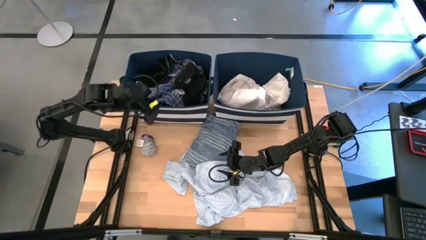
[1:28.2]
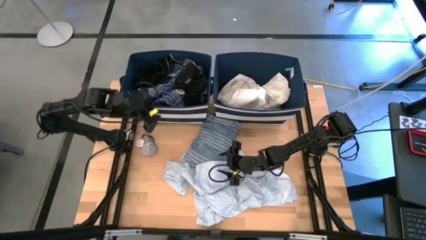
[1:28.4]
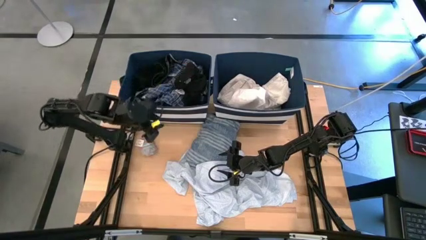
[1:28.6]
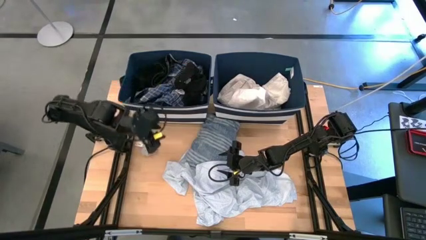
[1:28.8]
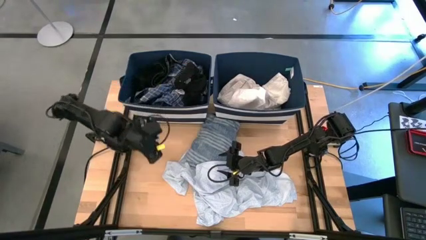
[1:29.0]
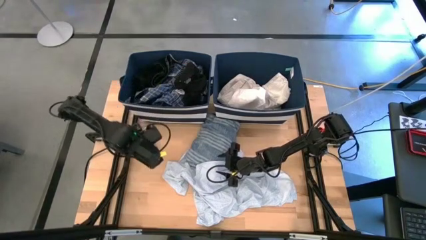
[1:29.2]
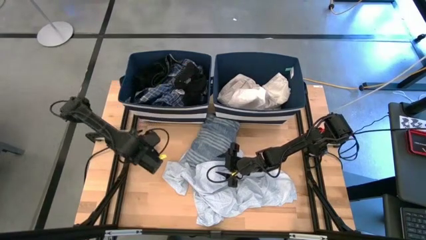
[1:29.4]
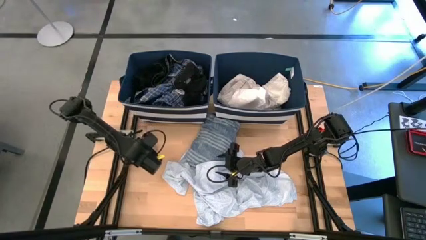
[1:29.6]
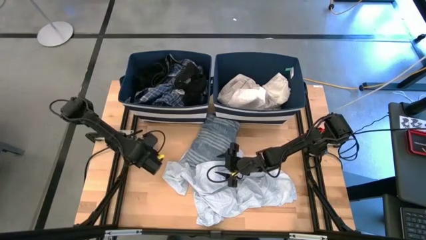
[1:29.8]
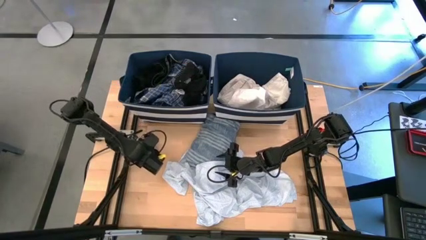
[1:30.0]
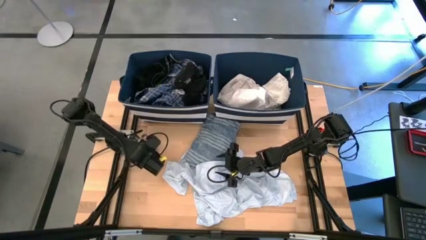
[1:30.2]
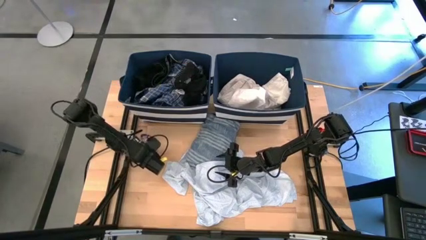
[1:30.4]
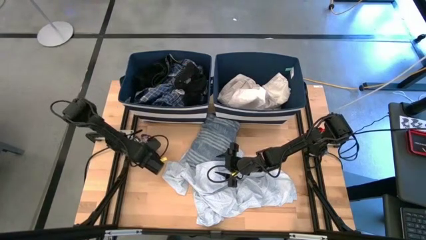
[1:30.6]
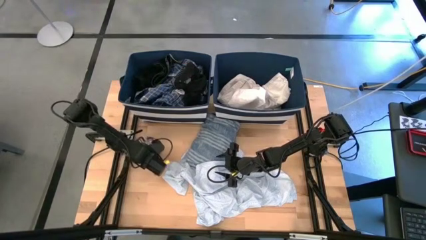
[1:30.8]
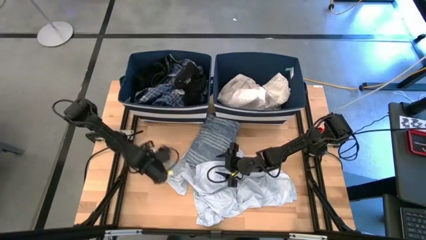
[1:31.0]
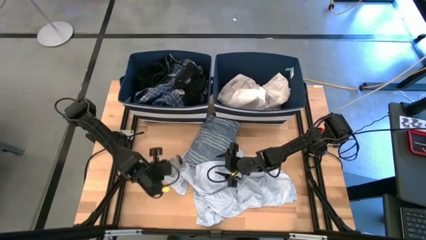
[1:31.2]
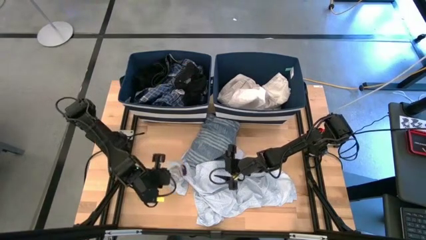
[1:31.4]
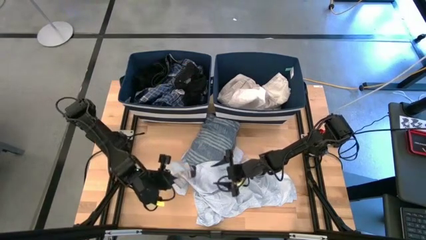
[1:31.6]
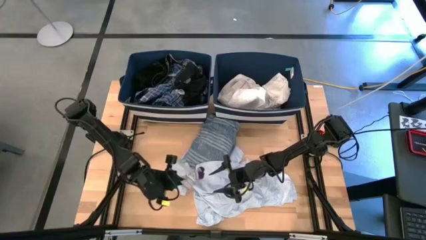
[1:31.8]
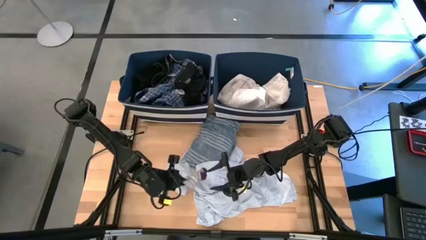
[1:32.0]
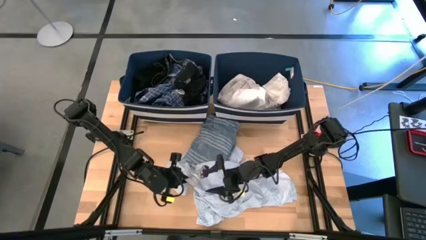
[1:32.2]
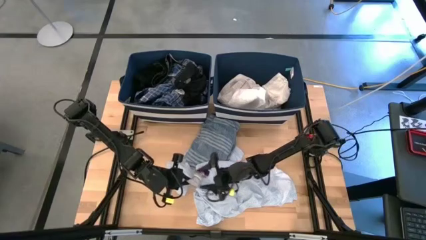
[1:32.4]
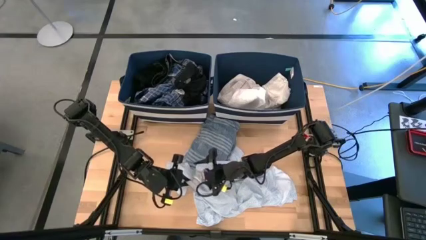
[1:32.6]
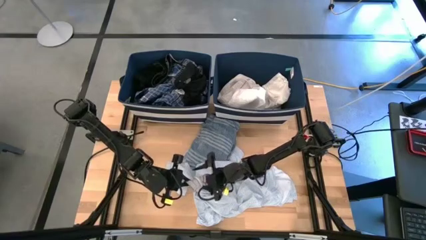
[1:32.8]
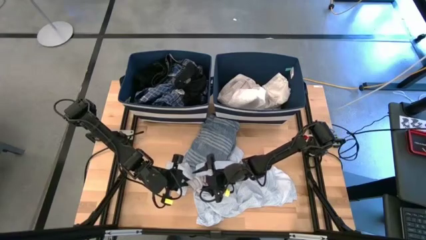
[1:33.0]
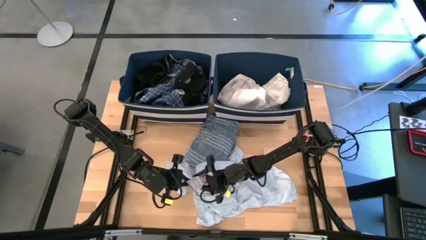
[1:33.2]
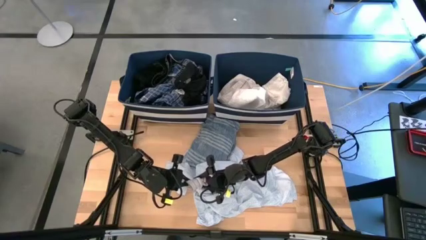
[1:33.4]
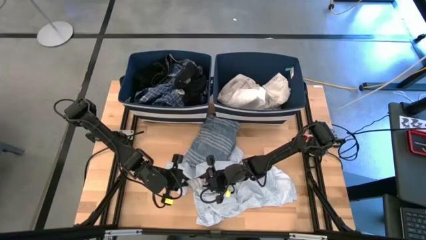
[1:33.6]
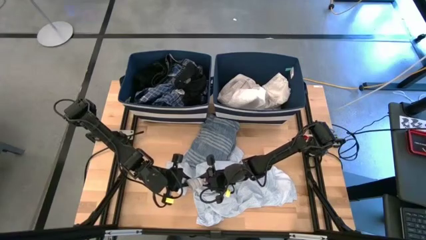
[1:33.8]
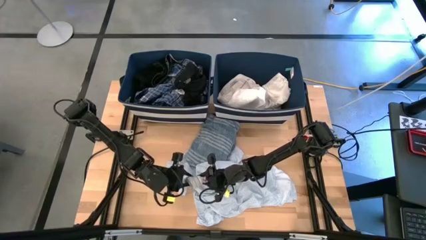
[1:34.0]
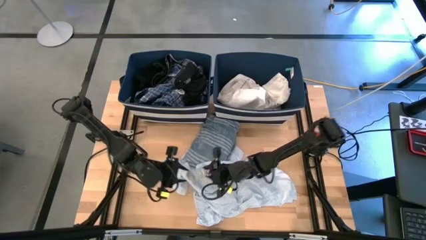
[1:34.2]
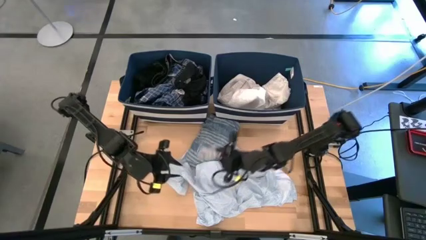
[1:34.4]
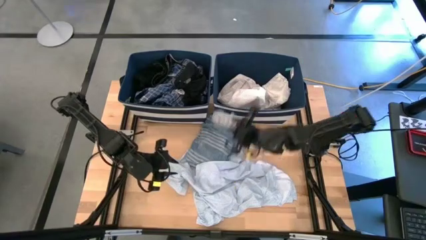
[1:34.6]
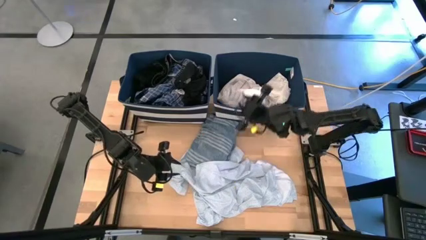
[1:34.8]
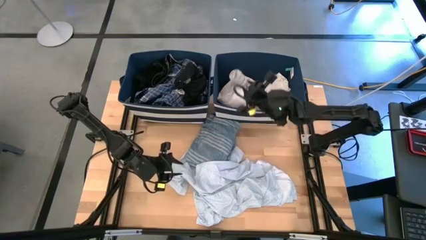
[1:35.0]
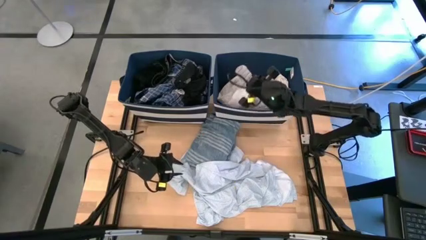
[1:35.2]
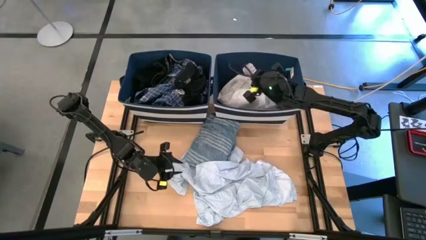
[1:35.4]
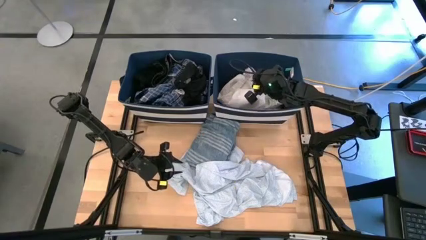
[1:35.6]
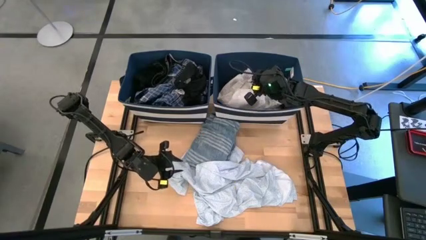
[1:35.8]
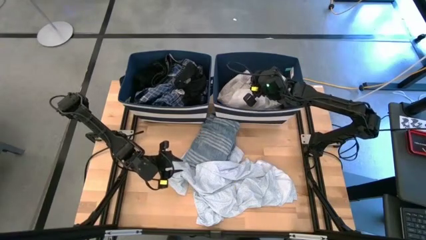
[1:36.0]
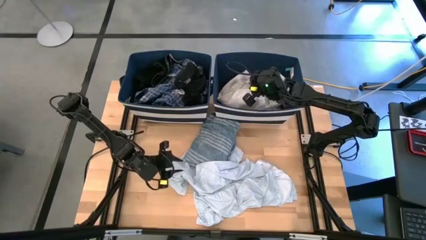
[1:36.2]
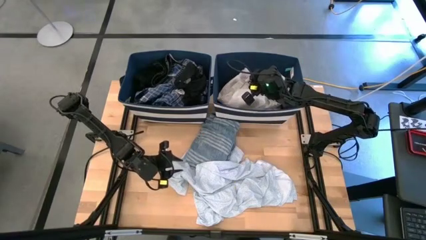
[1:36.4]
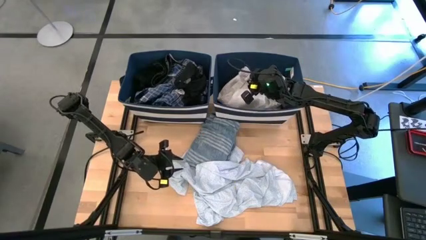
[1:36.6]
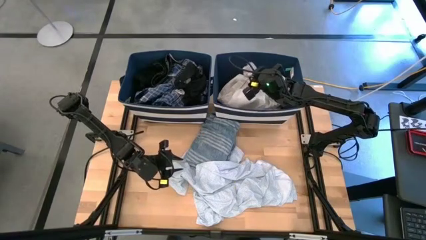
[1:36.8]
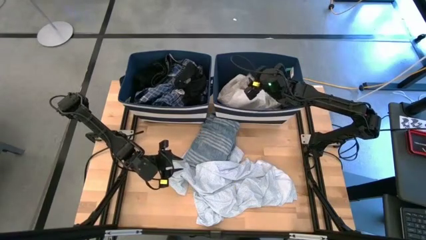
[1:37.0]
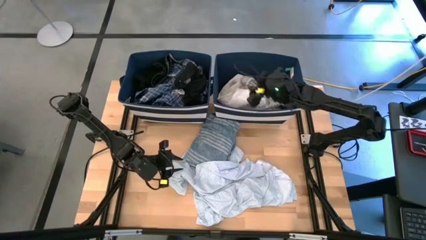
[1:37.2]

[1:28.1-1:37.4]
Task: Sort clothes
Put the gray socks into the right blue laundry bin

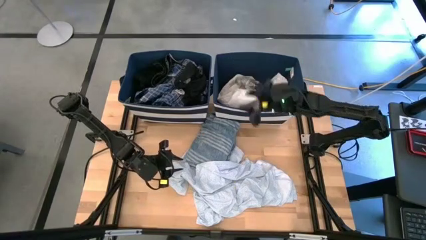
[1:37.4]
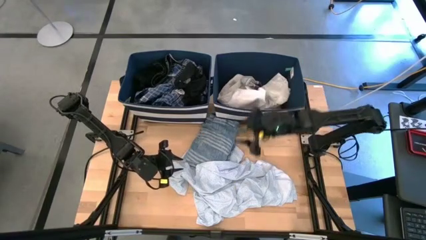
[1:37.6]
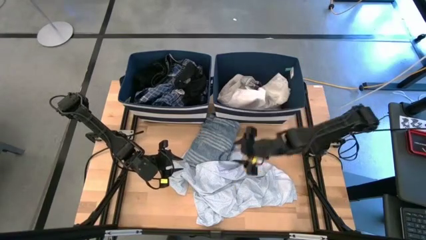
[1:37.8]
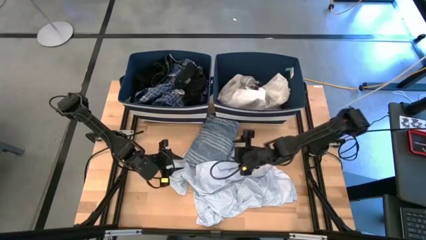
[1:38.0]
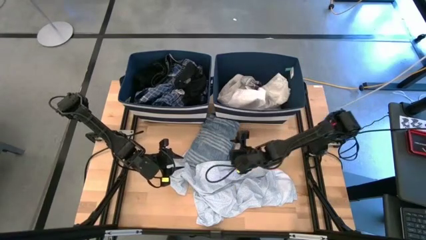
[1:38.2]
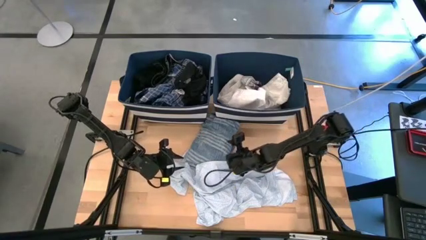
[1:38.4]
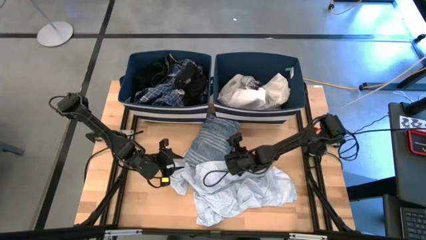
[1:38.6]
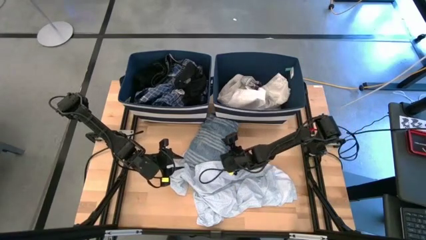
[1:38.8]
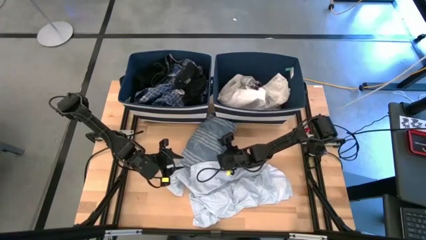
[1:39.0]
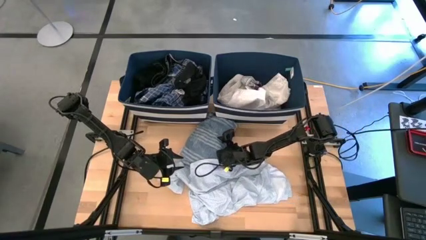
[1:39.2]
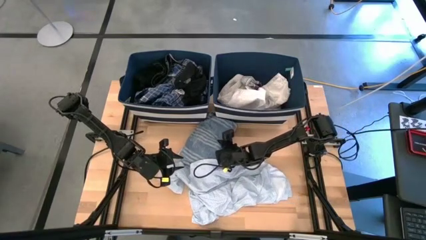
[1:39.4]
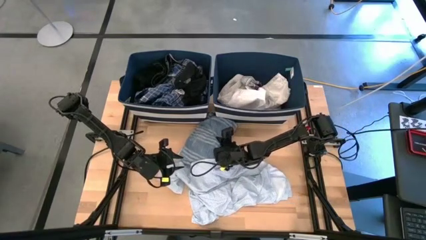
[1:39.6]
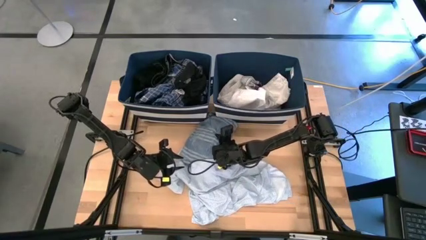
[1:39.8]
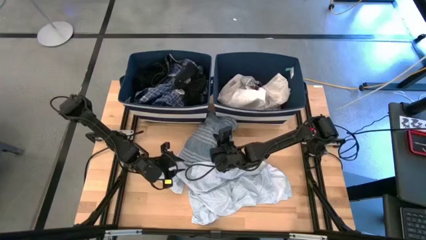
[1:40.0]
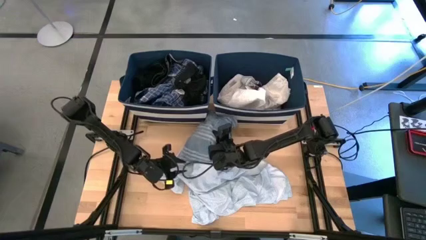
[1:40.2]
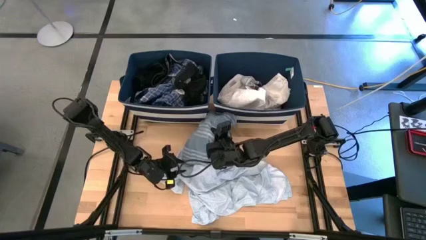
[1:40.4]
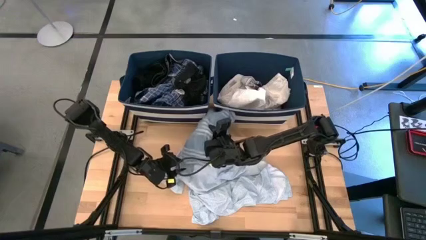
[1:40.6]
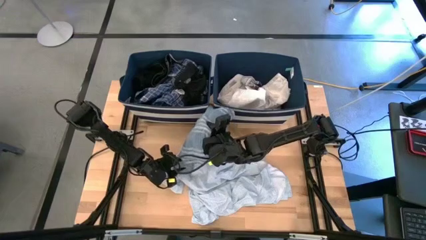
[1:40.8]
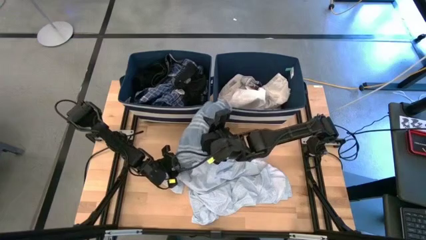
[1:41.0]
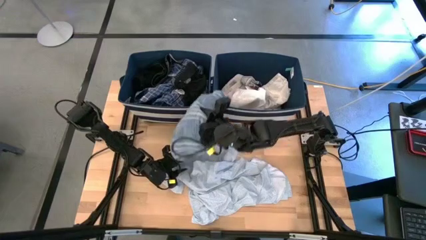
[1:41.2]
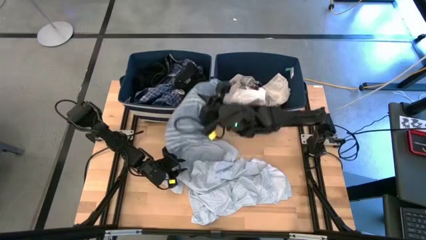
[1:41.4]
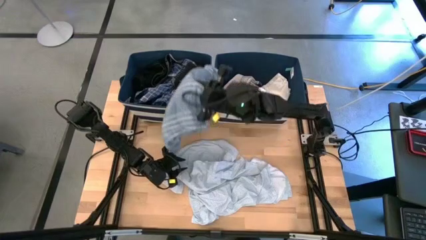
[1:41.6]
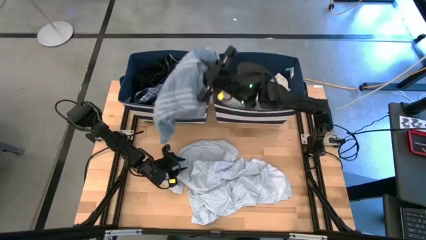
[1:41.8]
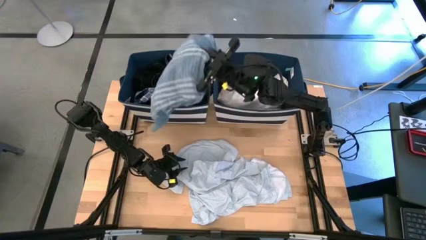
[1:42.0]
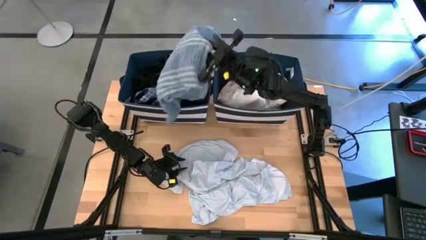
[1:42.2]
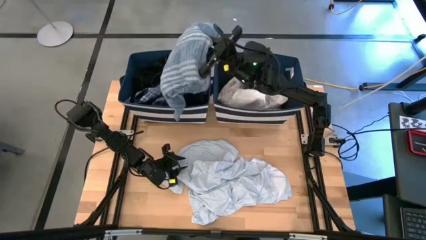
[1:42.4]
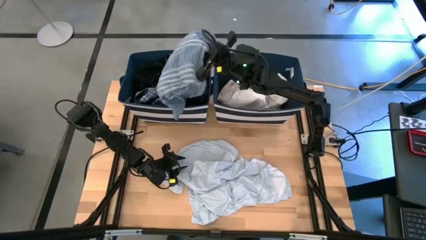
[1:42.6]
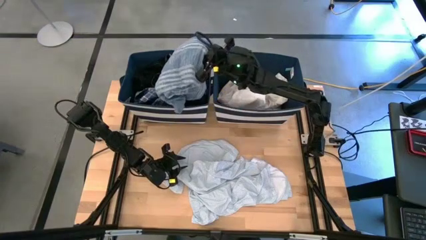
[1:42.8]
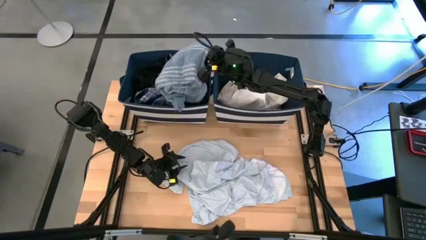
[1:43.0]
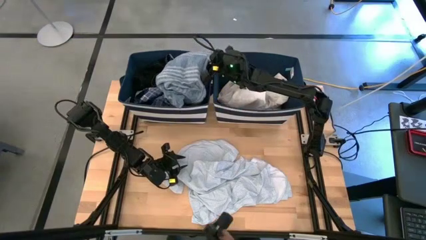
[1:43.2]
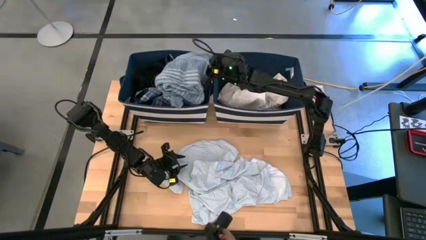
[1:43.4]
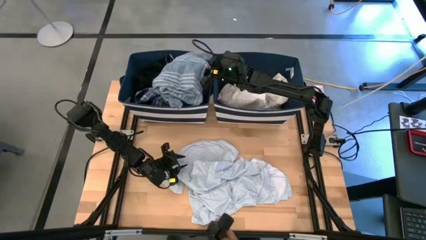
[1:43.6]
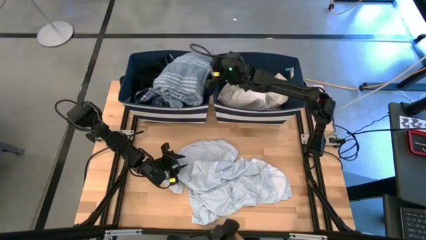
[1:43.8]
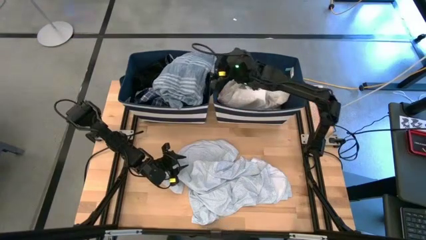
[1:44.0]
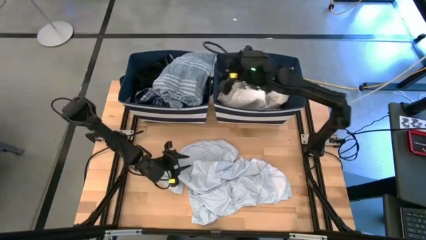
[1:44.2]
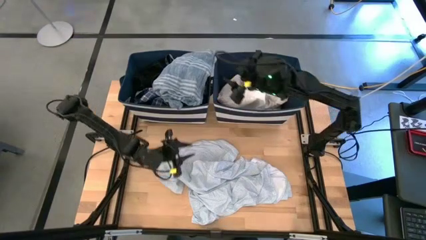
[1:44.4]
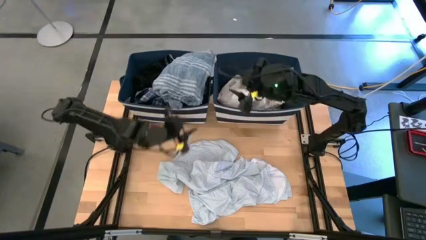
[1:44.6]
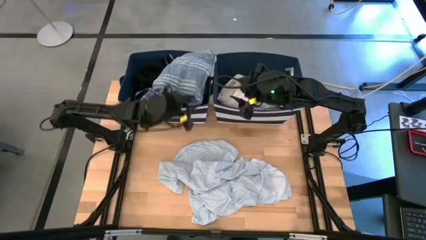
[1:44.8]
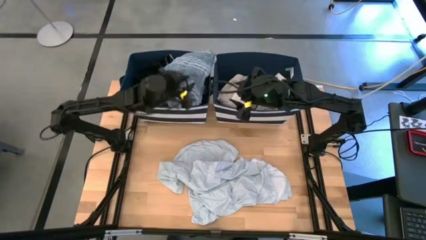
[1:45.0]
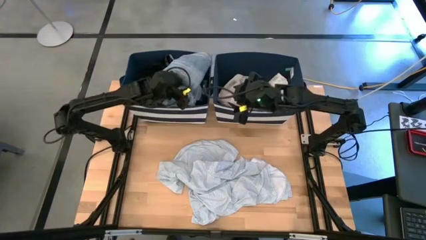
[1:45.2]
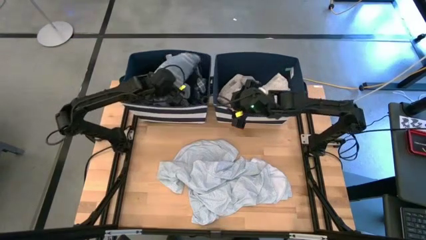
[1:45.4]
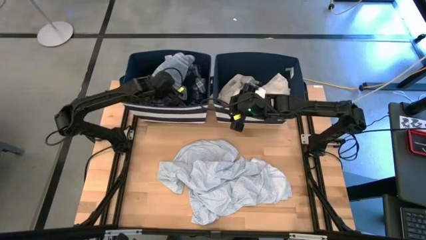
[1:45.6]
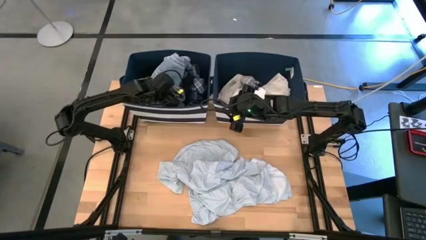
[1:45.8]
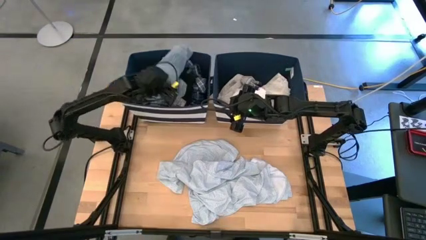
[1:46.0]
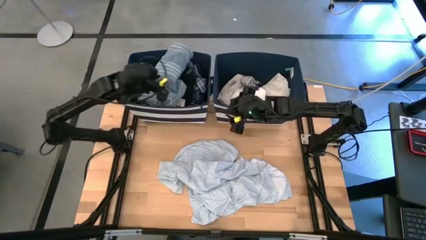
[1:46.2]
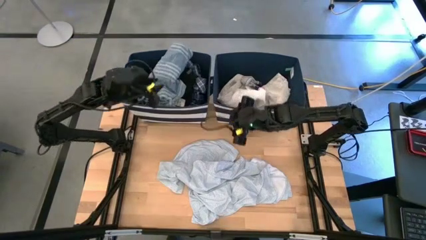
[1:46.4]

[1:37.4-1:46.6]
Put the gray long sleeve shirt into the left blue laundry bin
